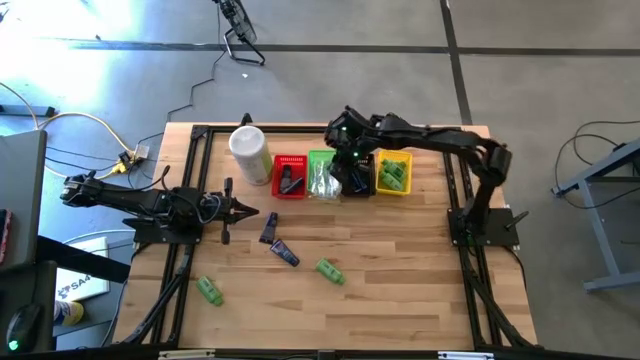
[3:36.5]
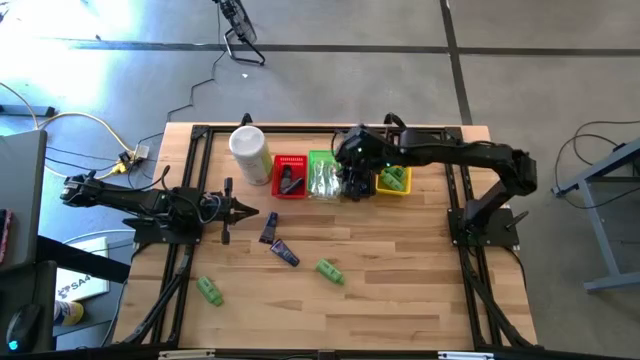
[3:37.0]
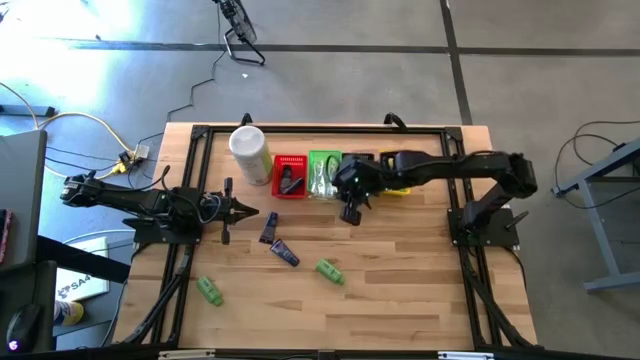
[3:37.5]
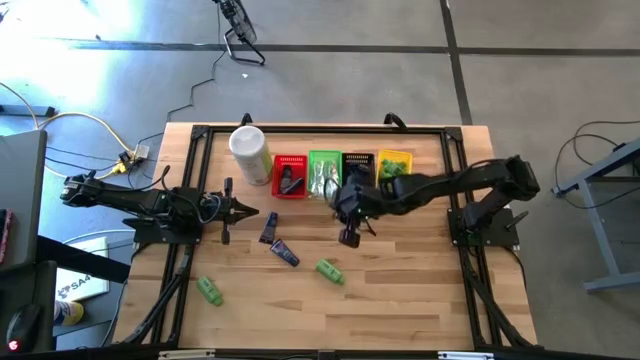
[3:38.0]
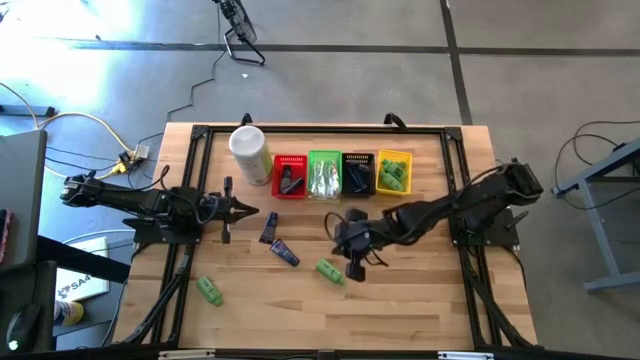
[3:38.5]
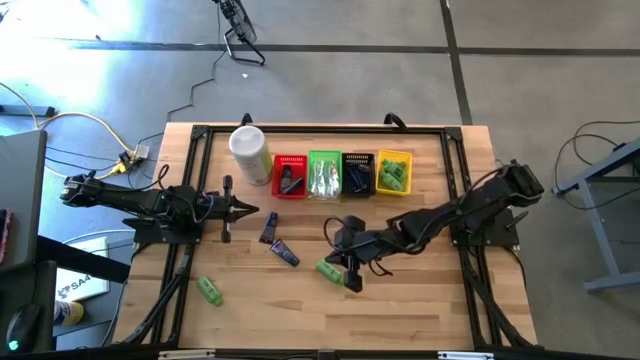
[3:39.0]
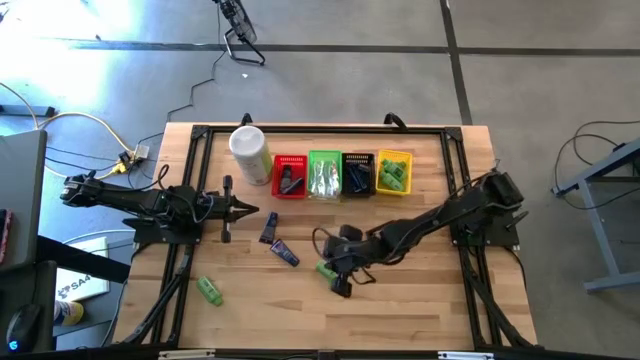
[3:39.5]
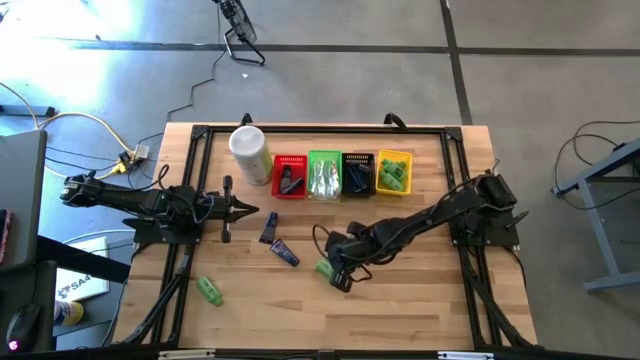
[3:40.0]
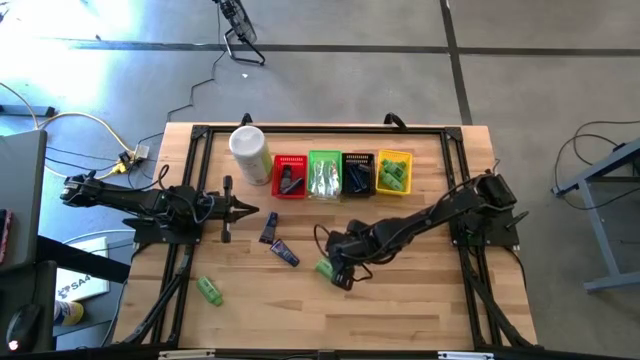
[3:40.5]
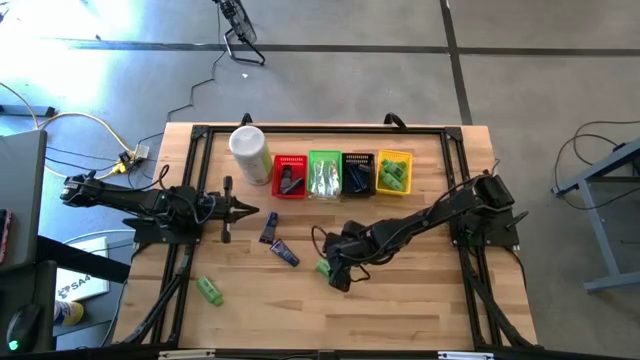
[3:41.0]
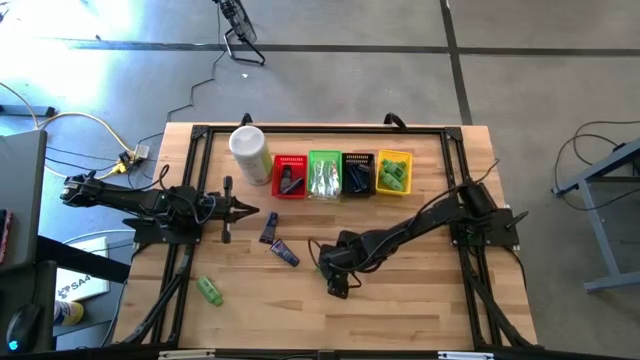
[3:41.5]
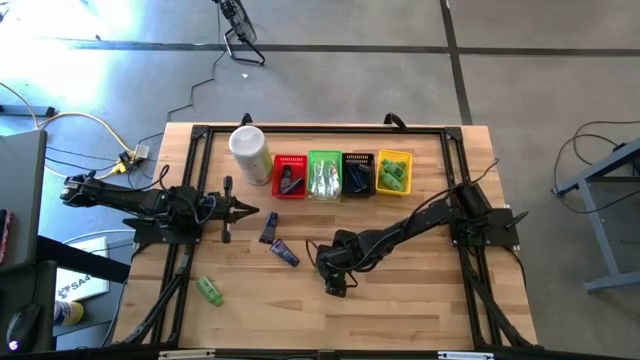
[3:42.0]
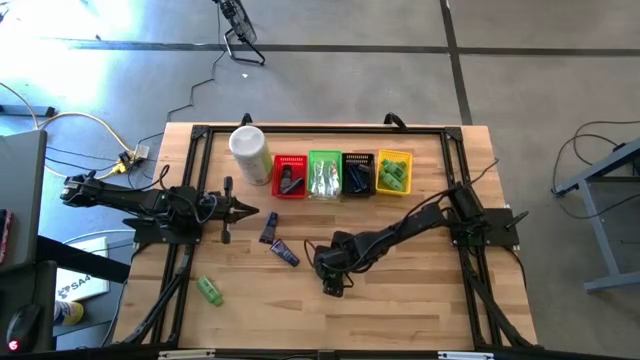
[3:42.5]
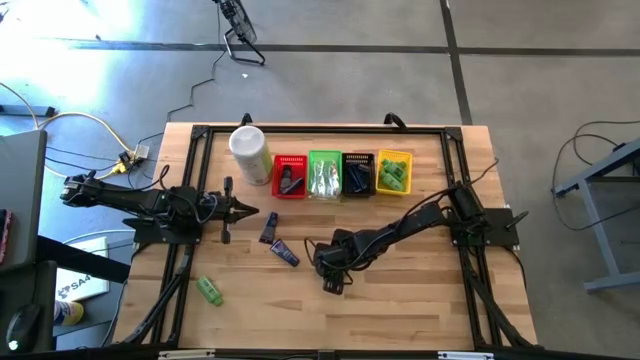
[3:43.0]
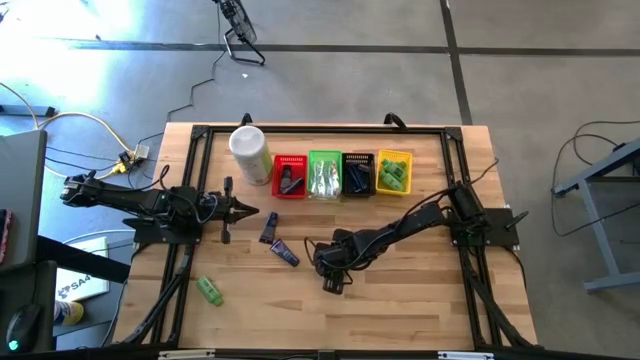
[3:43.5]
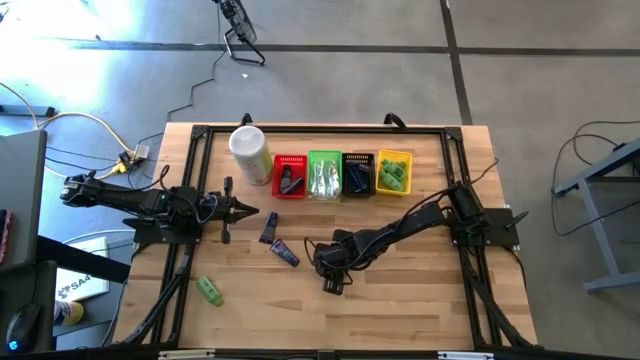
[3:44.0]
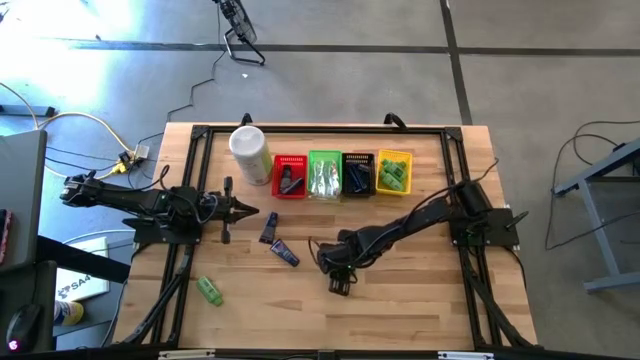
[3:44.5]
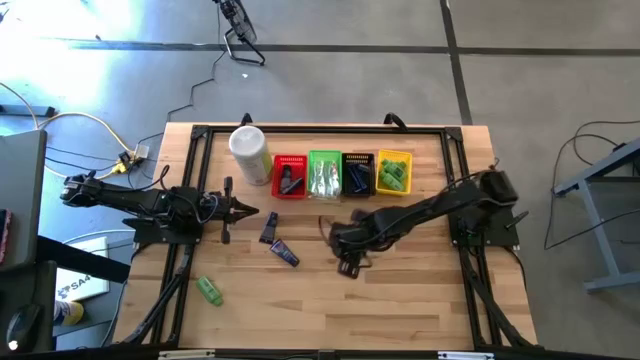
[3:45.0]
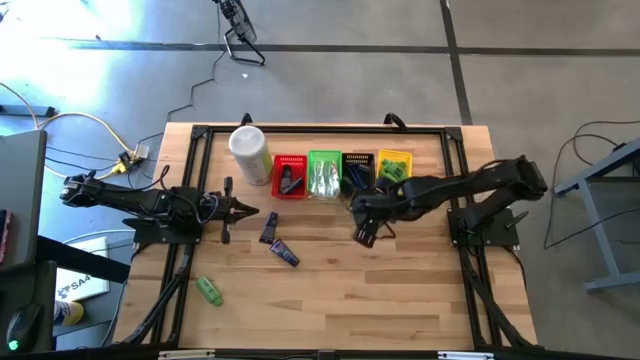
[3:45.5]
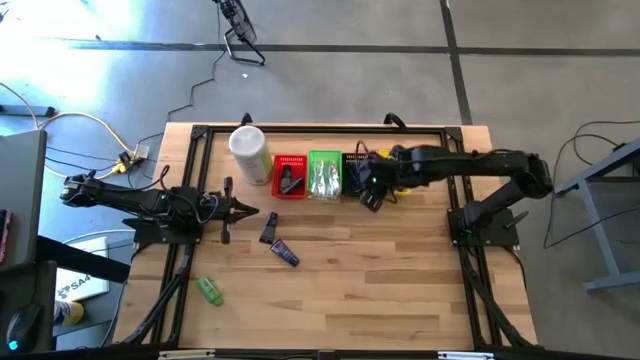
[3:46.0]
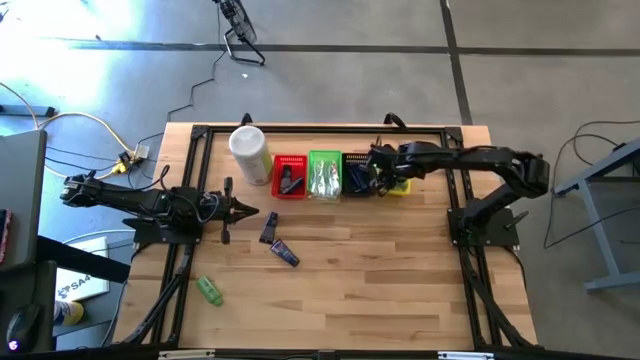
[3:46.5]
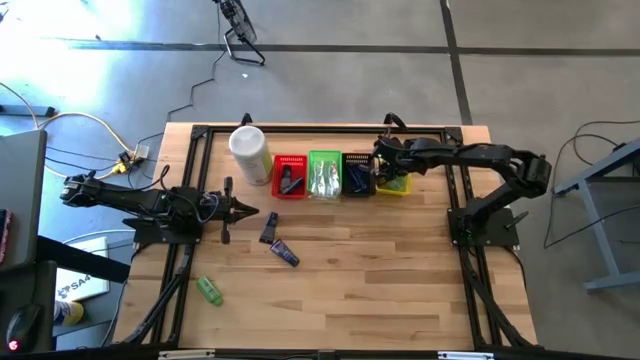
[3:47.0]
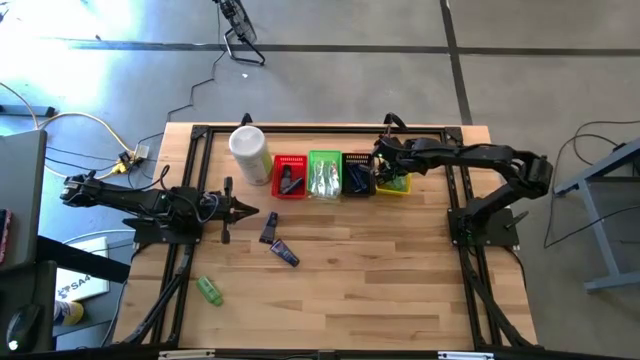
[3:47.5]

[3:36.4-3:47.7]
Task: Pick & Place Travel size toiletries
Put the green shampoo into the yellow bin

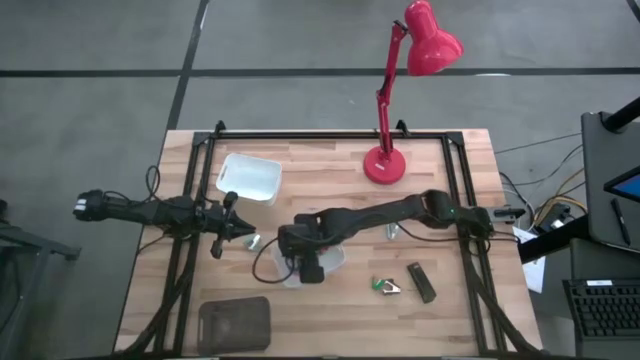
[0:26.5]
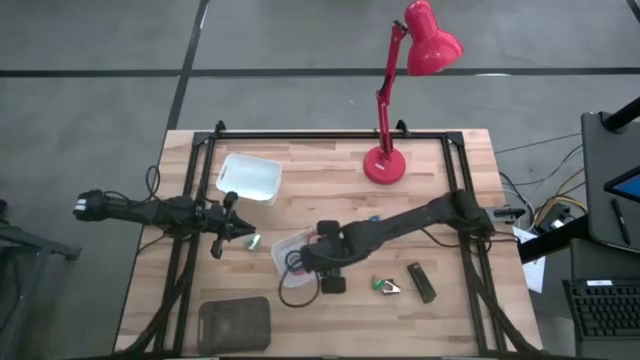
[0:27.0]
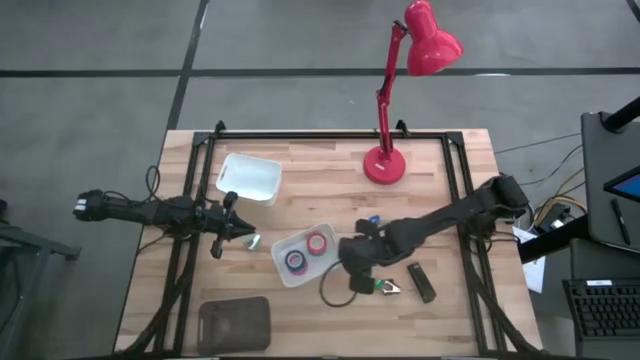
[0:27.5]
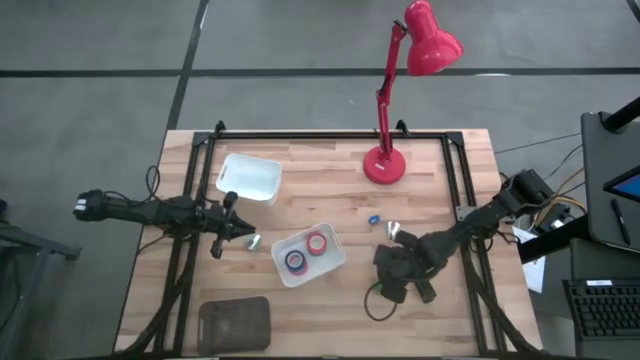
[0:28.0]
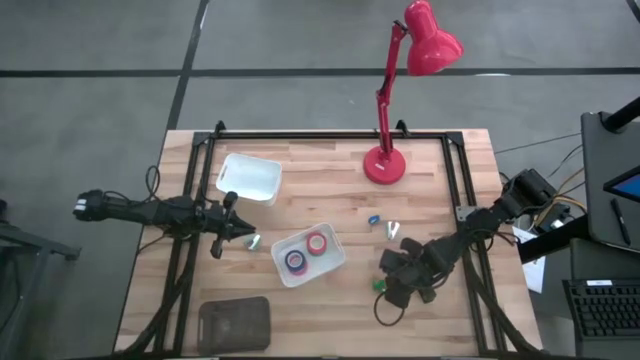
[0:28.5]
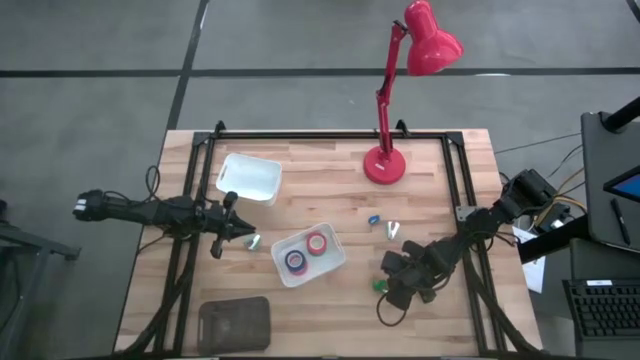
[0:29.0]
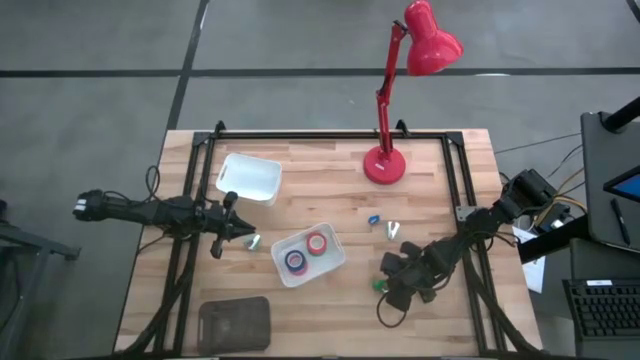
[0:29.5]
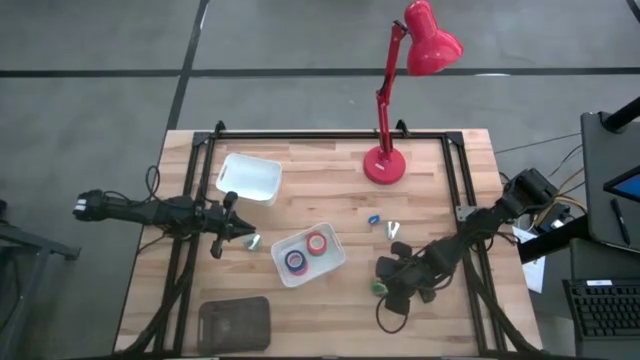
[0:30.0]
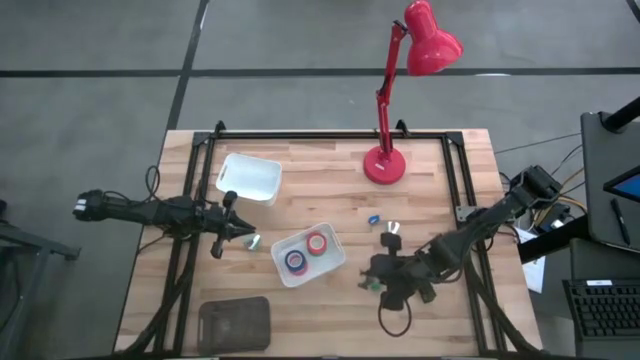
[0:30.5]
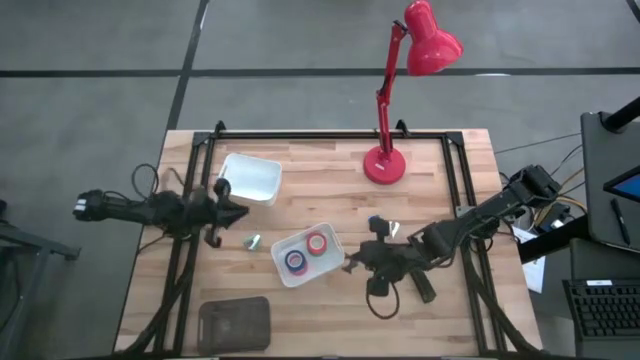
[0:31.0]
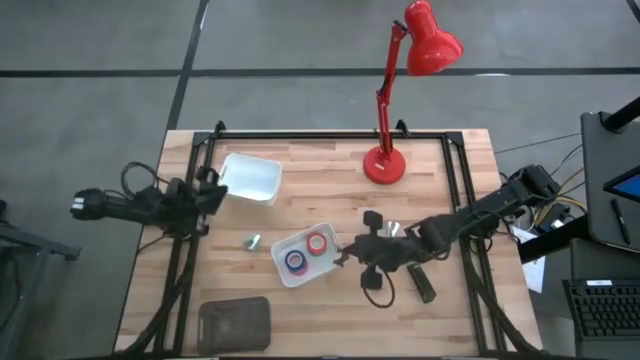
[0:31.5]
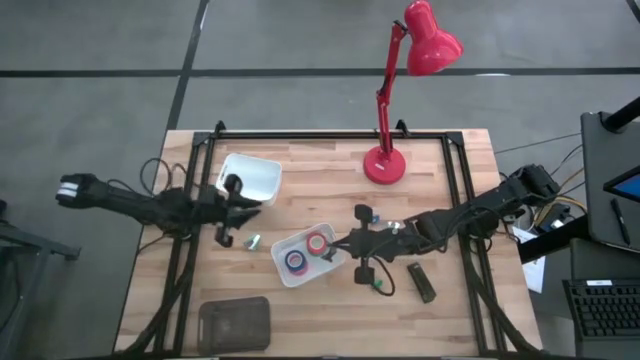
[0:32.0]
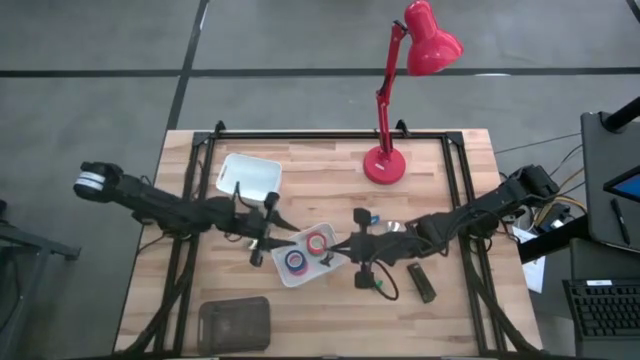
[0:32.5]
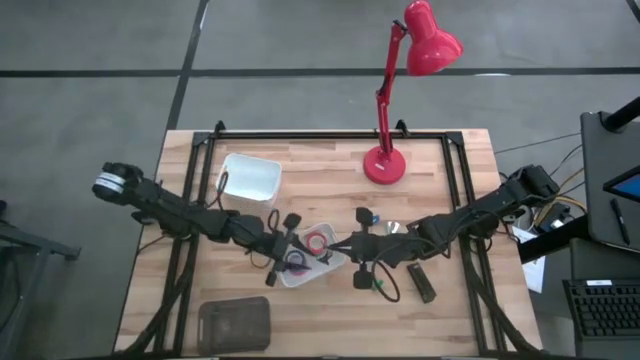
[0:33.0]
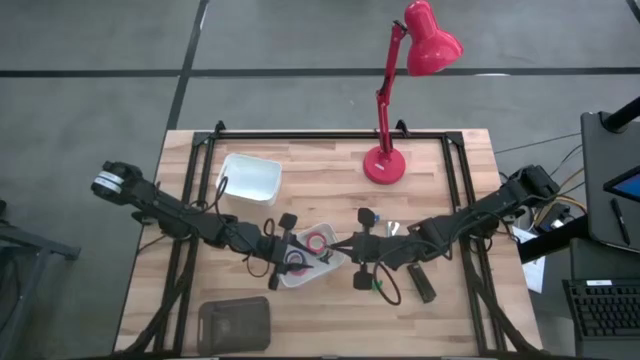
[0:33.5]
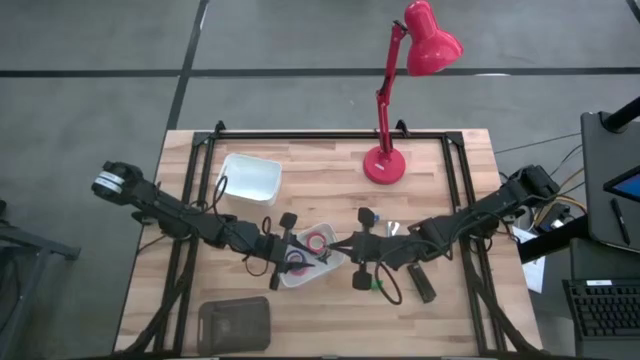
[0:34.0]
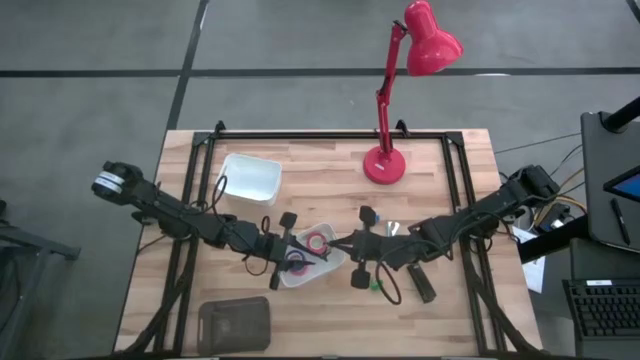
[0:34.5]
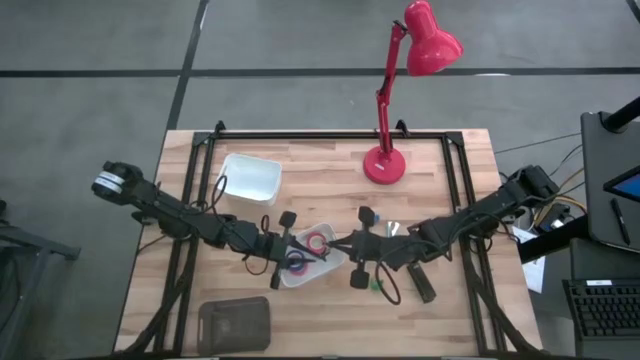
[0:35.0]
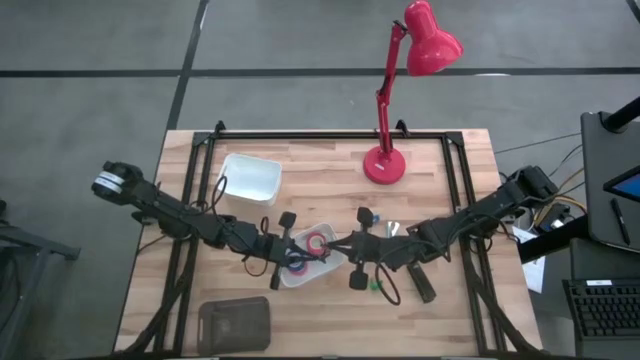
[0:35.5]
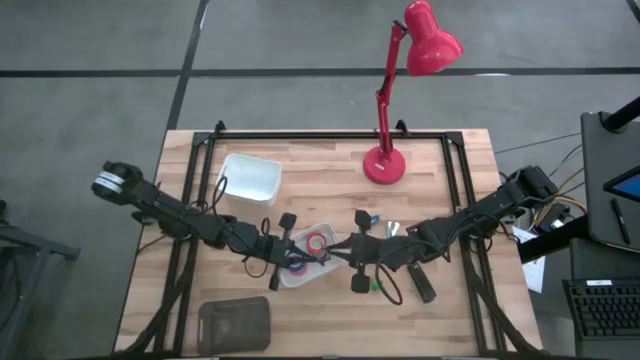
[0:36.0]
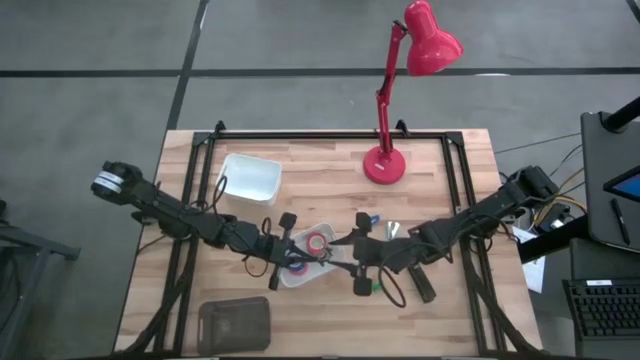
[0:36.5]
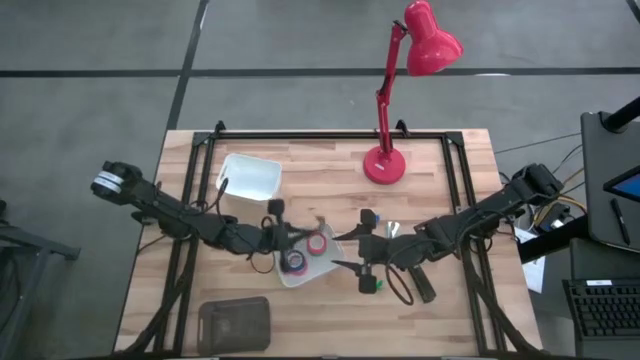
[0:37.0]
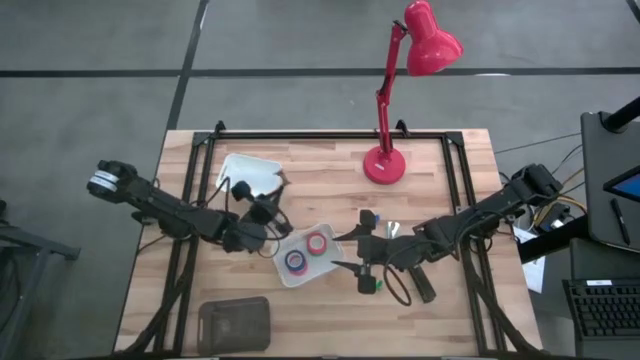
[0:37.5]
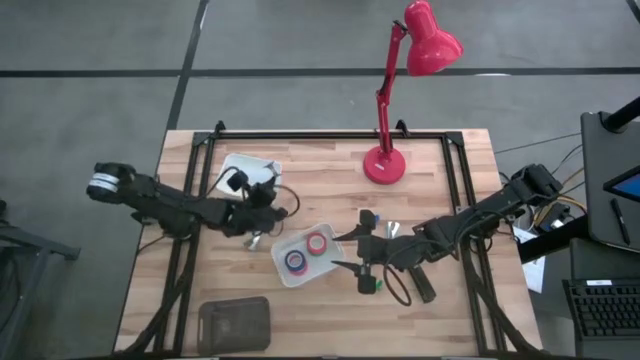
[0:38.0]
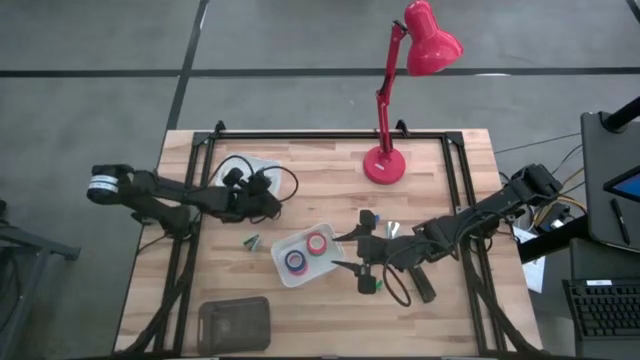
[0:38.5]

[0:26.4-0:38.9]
Task: Pick and place Stapler, Stapler remover, tape
Put the black staple remover into the top white bin
